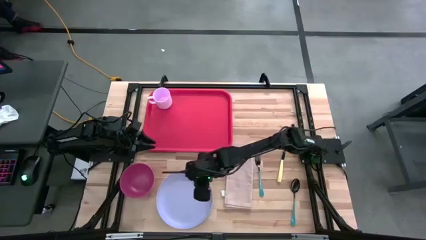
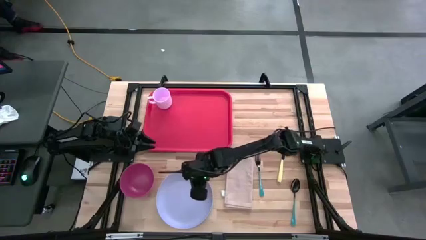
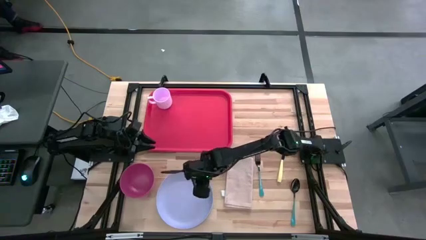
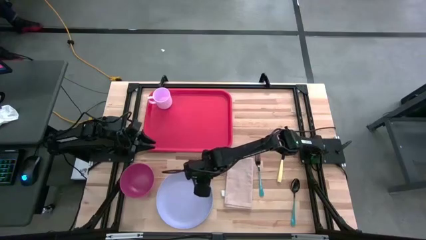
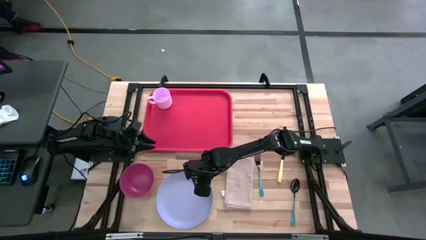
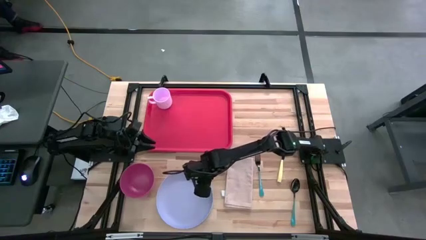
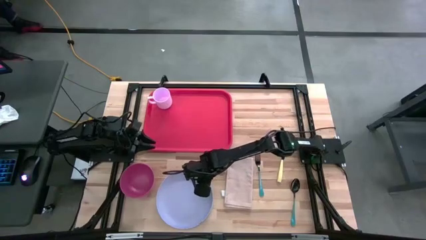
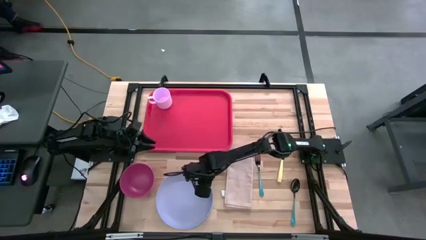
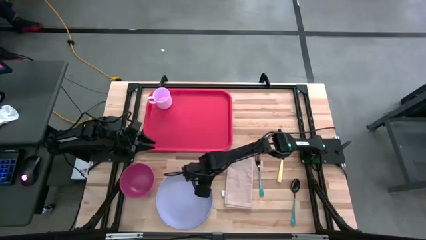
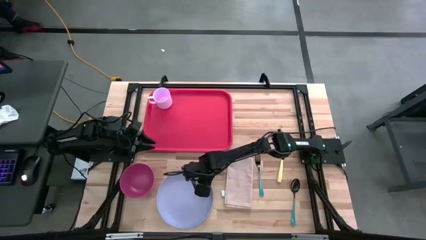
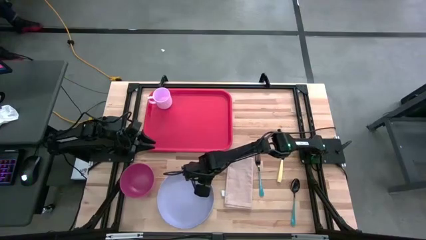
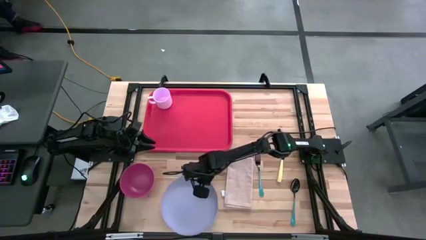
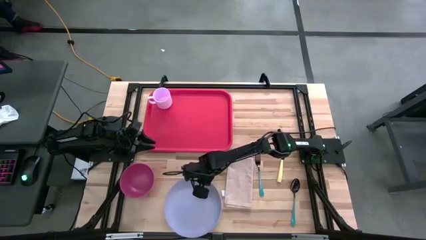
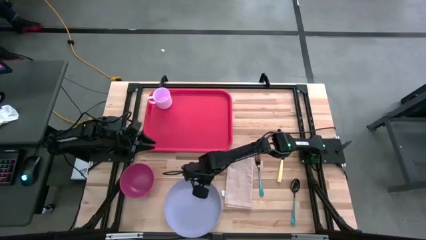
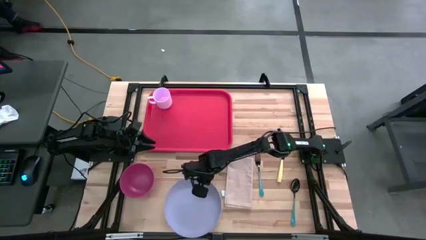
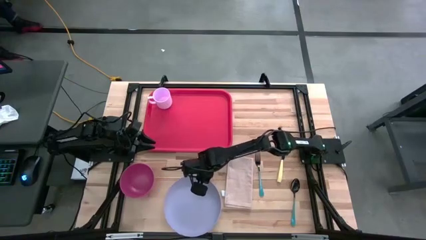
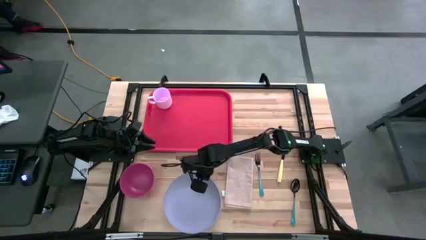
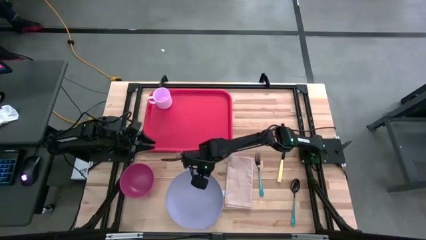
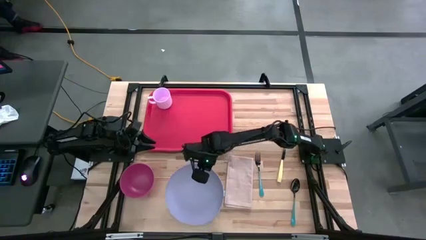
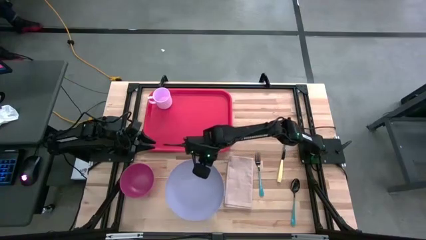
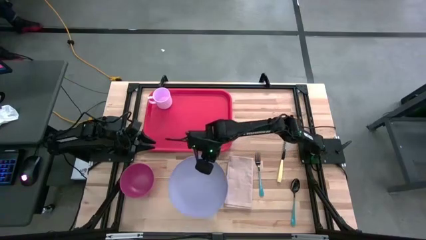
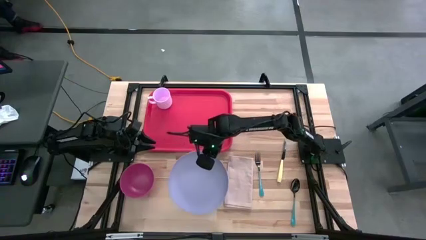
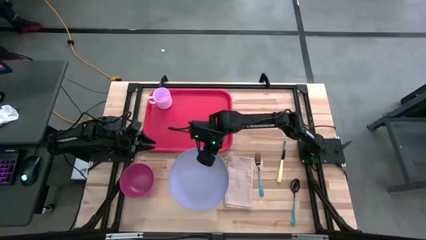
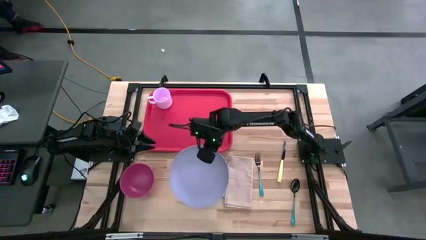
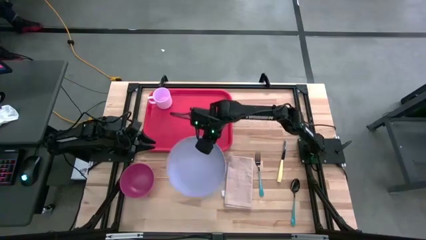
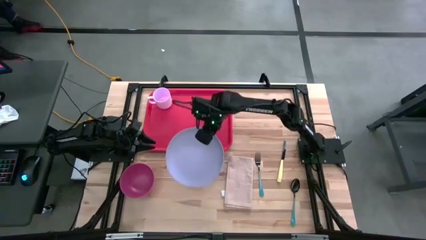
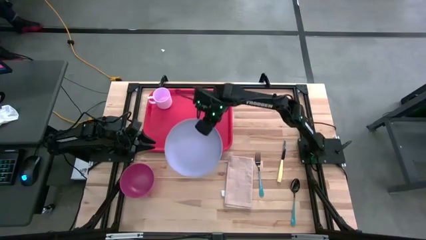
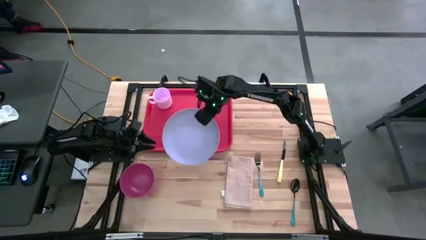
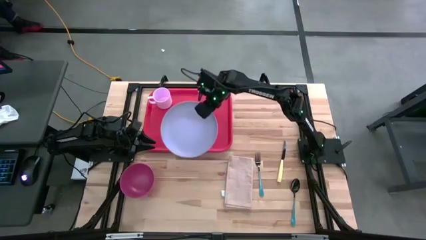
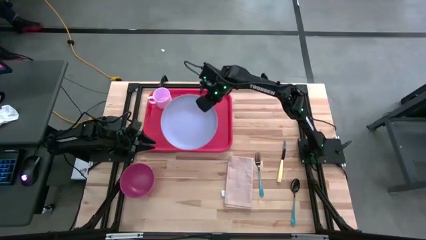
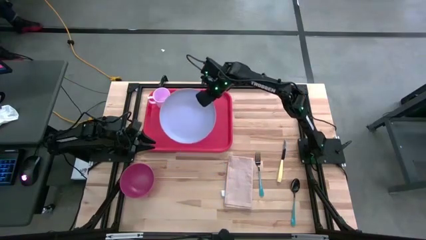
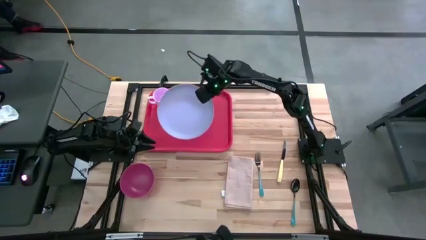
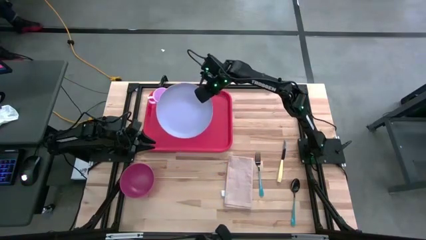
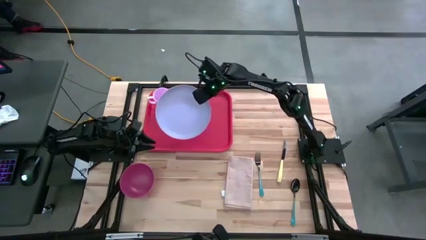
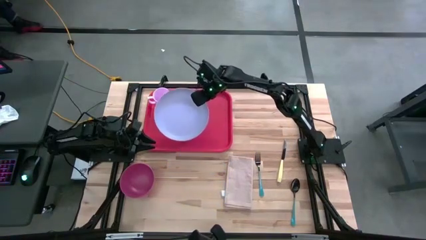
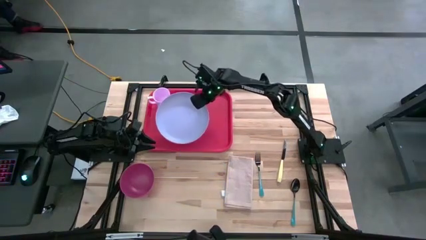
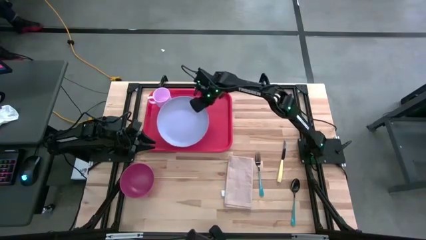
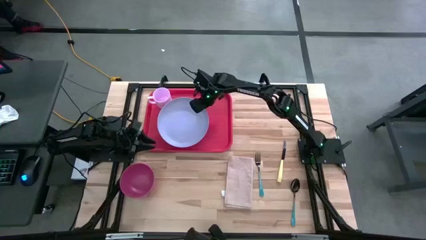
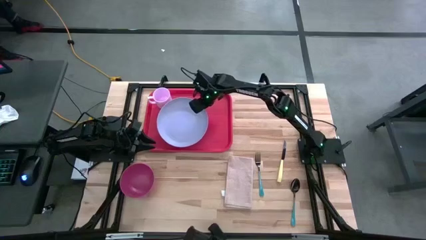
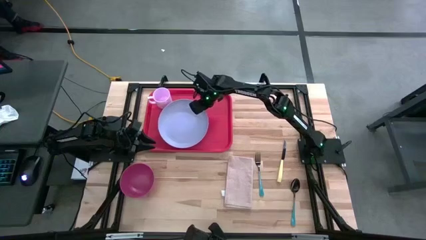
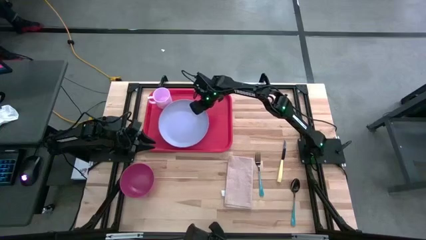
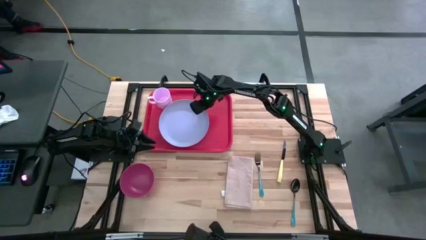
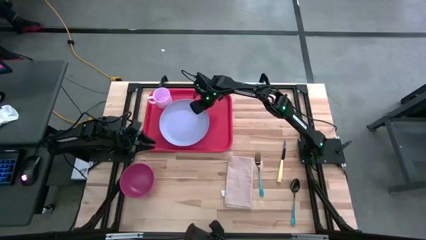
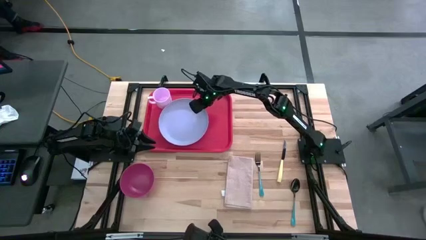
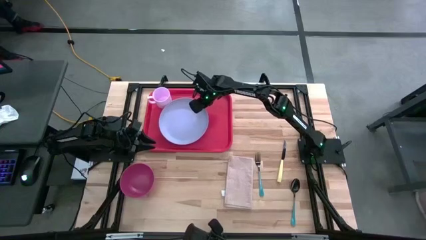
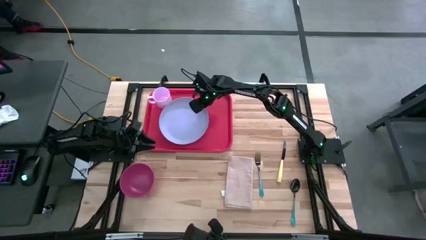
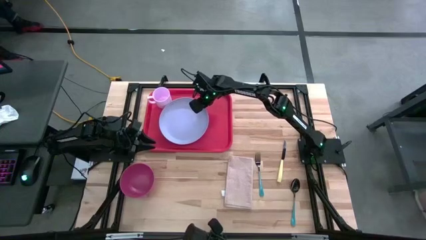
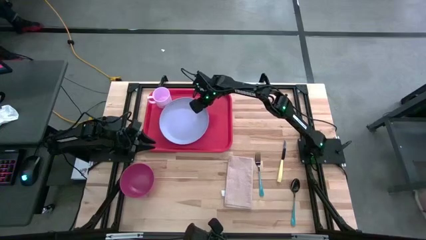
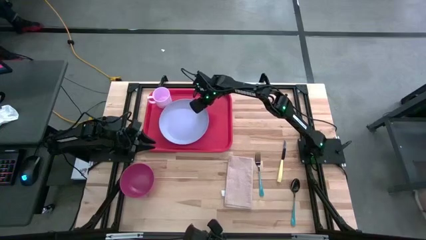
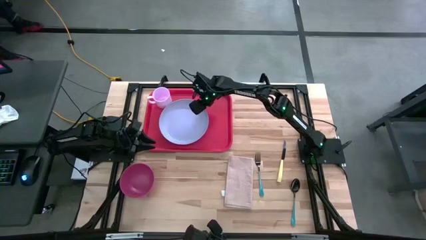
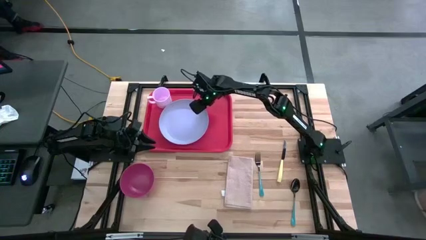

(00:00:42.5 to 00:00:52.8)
Task: Set up tray
Put the blue plate to the bottom right of the pink mug on the red tray

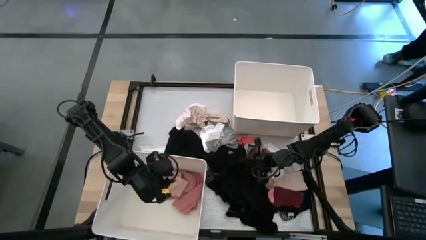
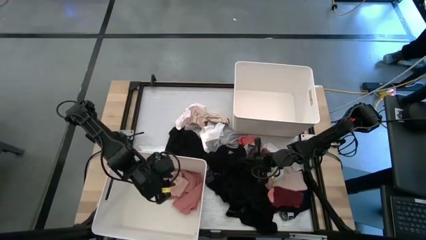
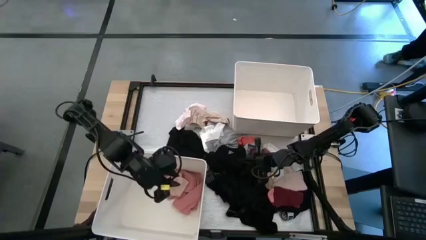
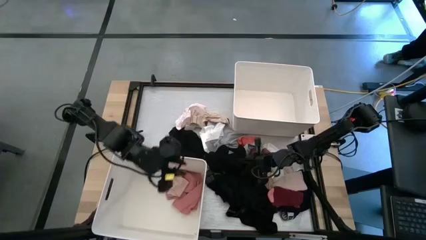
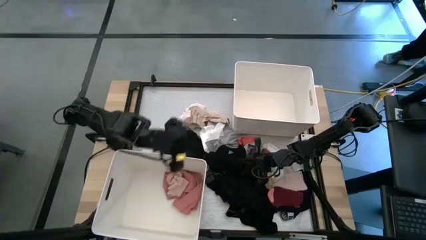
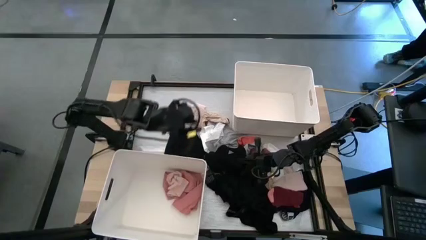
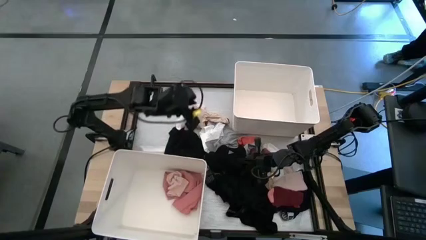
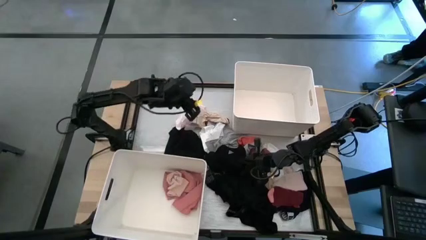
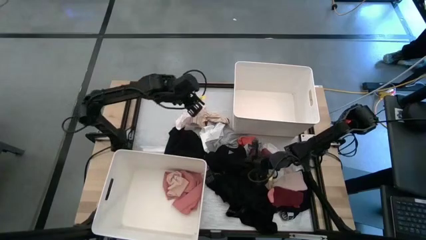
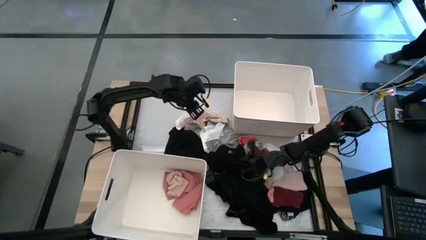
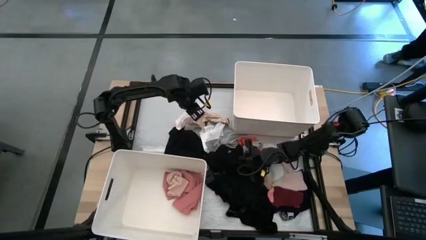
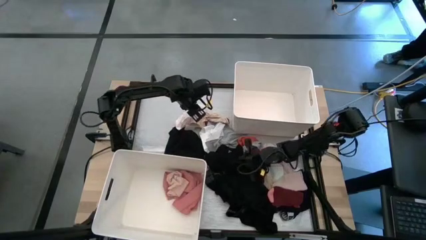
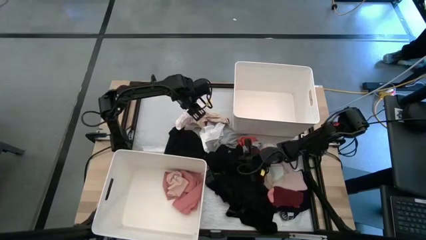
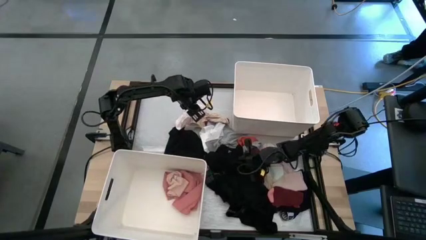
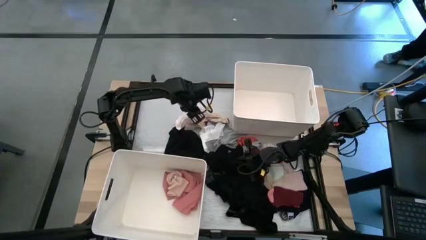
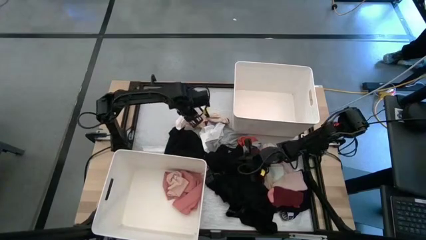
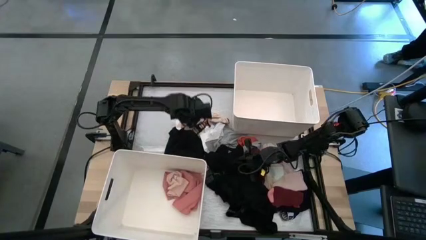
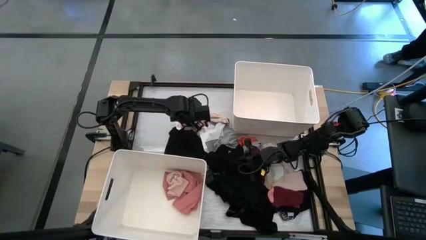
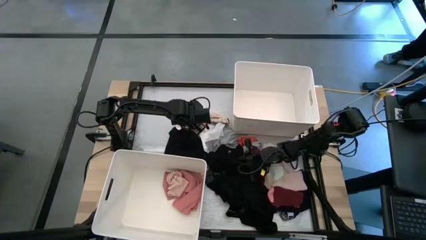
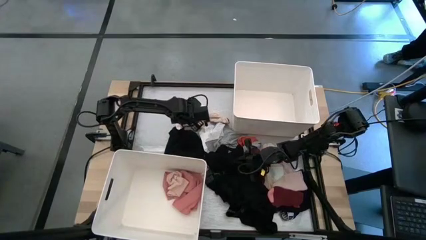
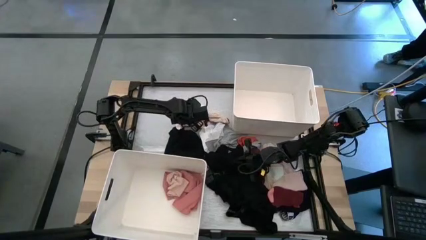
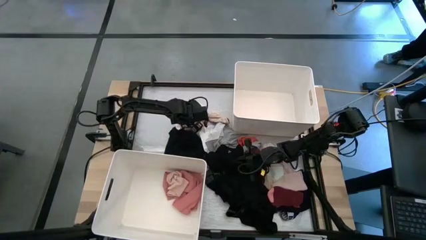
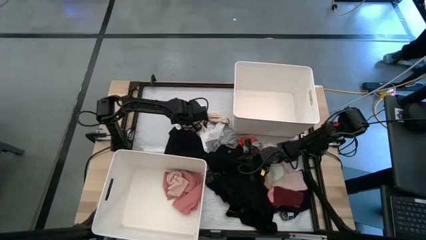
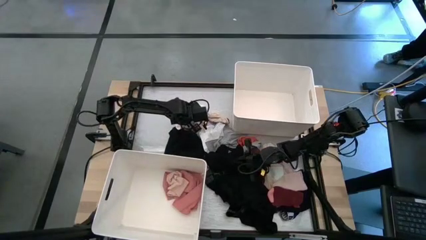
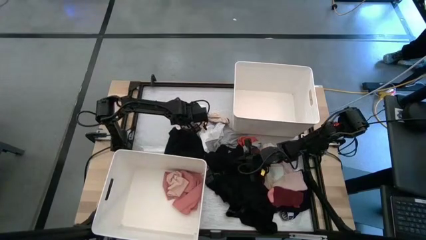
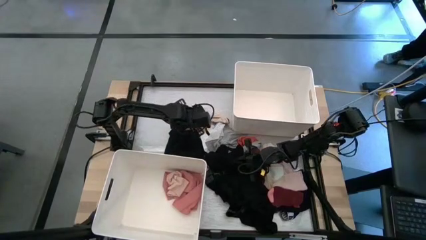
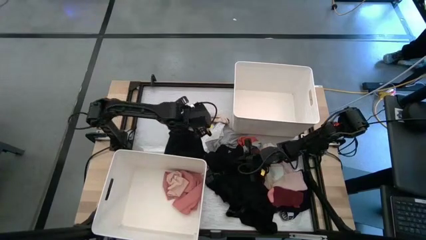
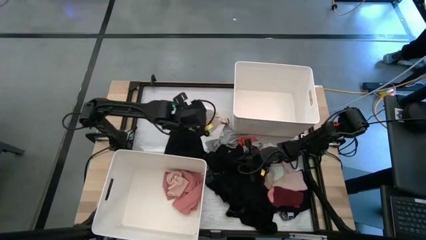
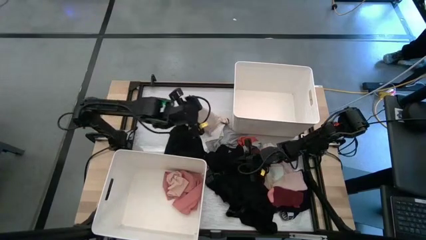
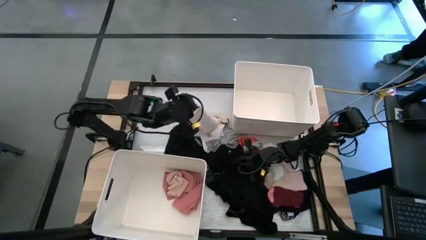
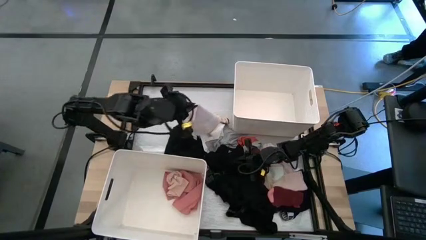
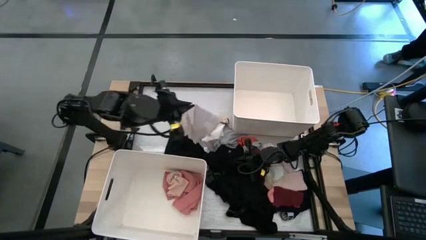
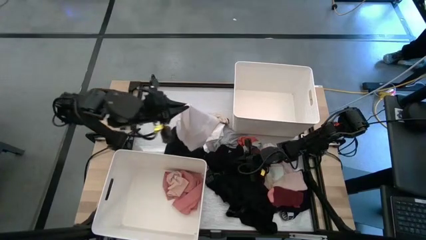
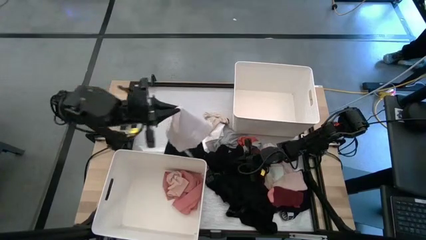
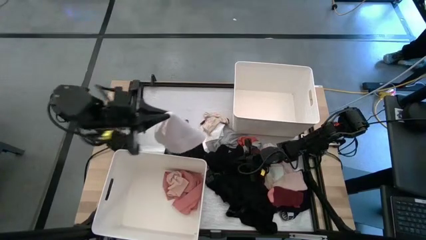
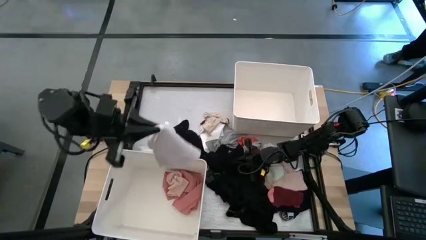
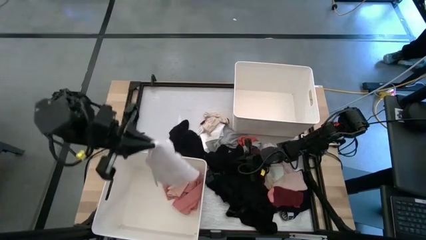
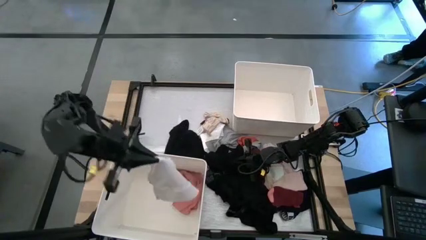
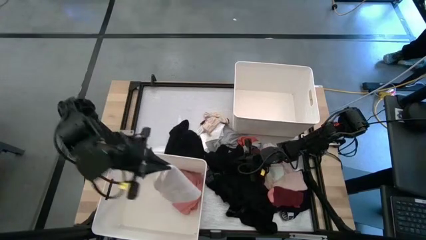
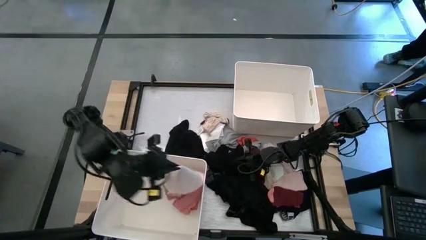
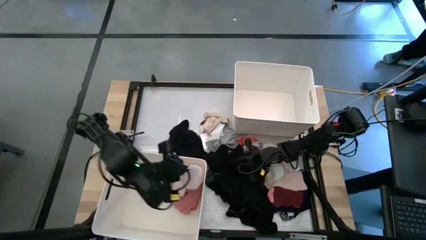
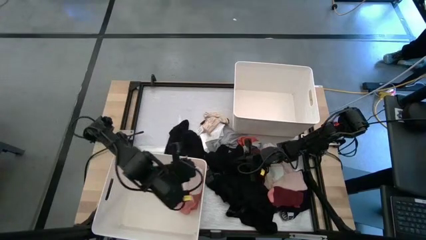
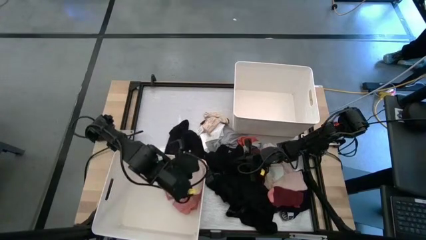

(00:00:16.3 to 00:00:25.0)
Task: Sort clothes
Put the light pink underwear into the bottom white bin
